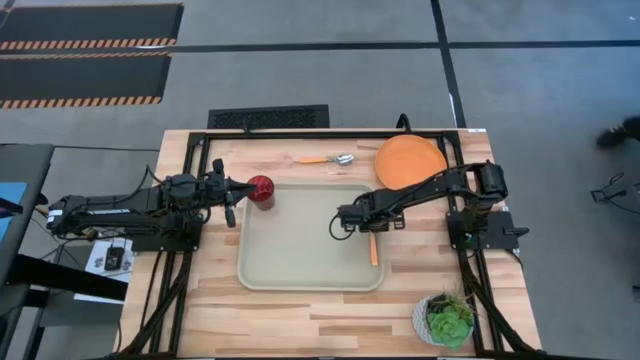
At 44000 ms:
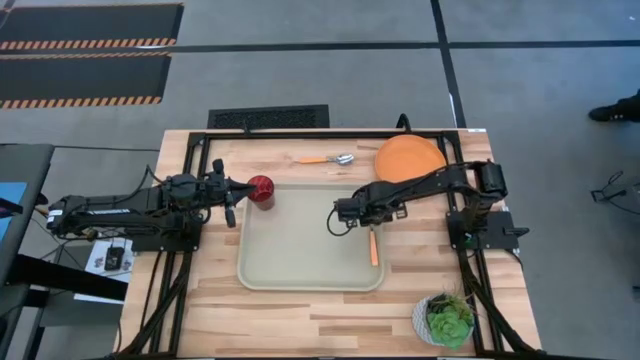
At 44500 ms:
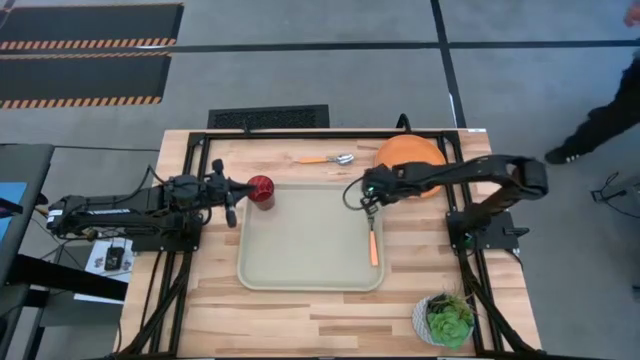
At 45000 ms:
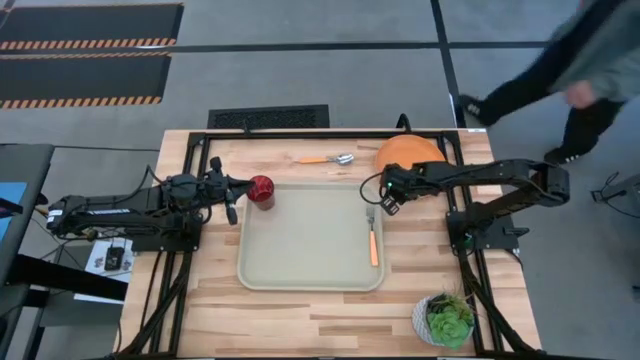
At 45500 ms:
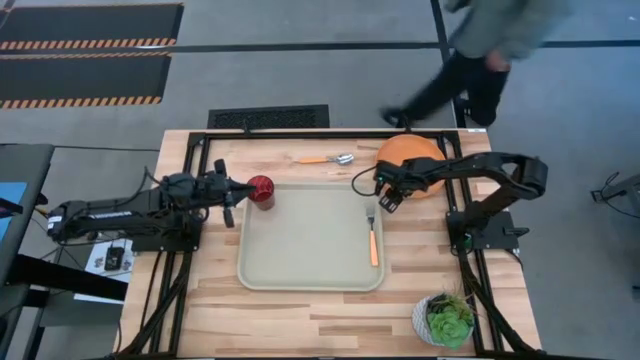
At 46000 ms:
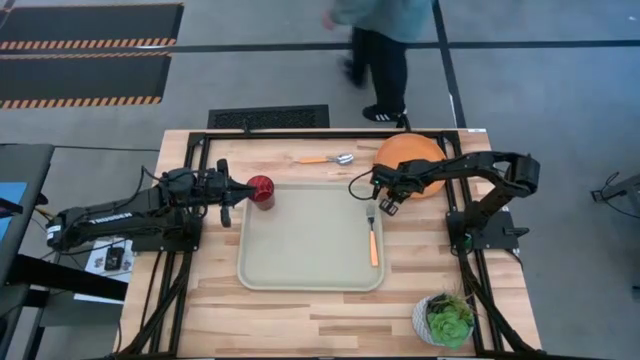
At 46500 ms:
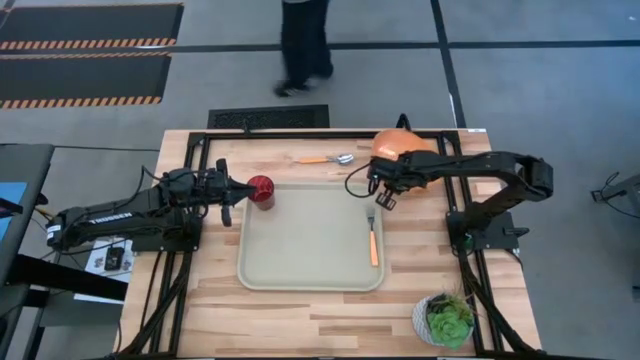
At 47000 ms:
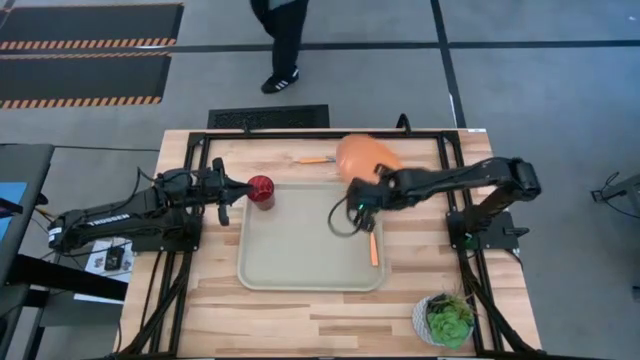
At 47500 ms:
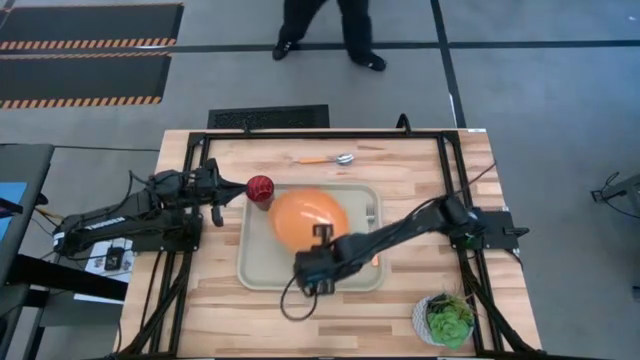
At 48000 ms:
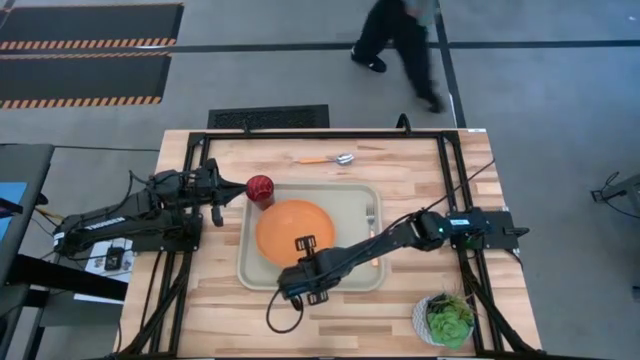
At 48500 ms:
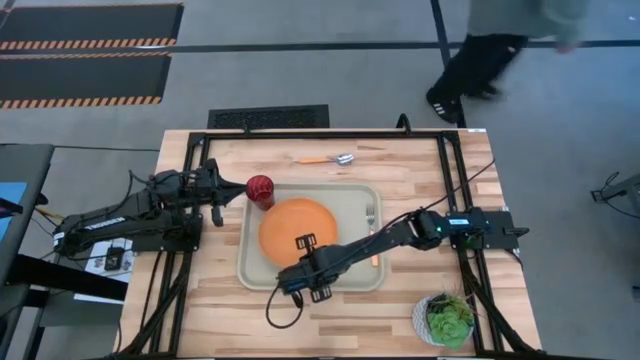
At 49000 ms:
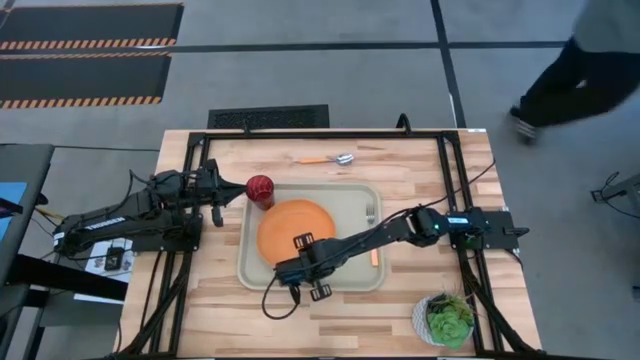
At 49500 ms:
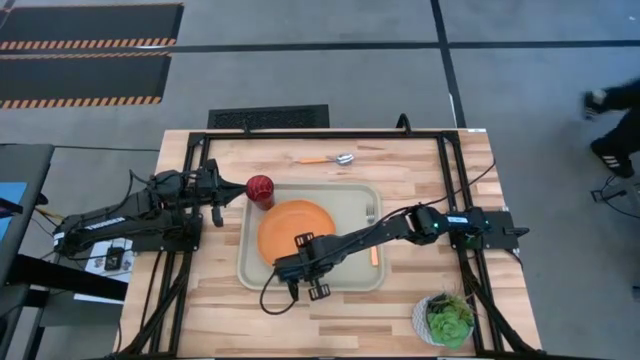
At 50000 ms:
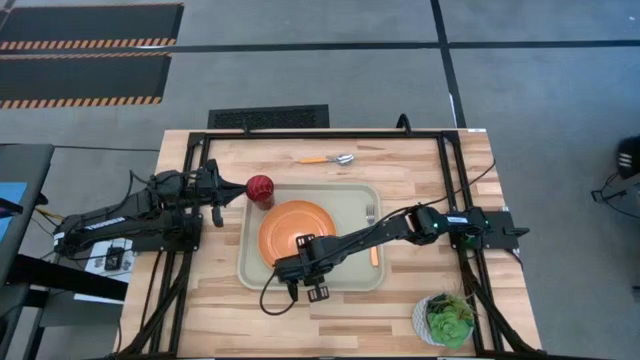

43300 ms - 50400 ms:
Task: Pick and place plate/cup/fork/spoon on tray
Put the orange plate in the middle of the gray serving tray

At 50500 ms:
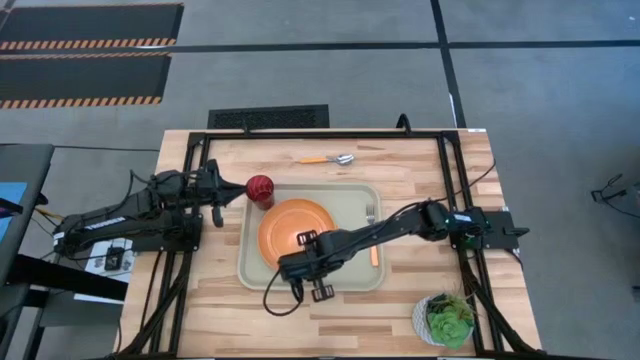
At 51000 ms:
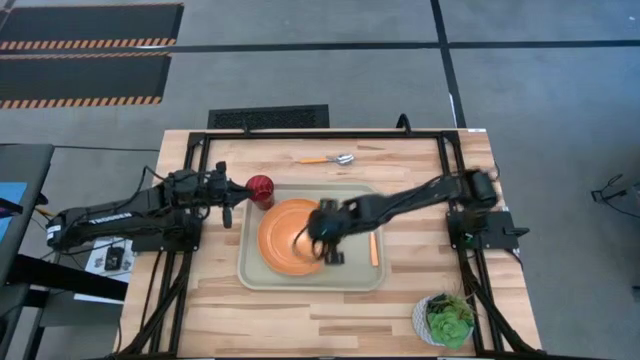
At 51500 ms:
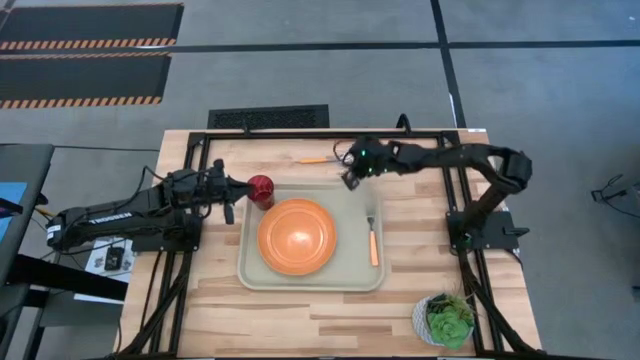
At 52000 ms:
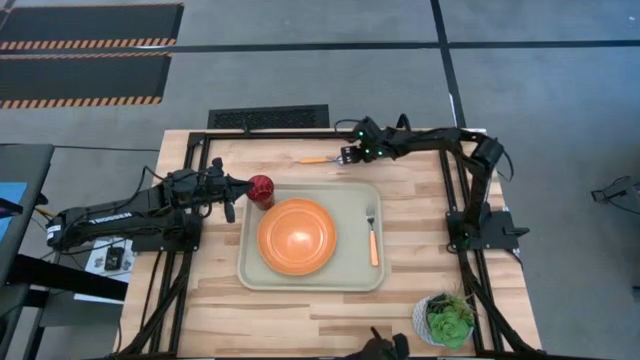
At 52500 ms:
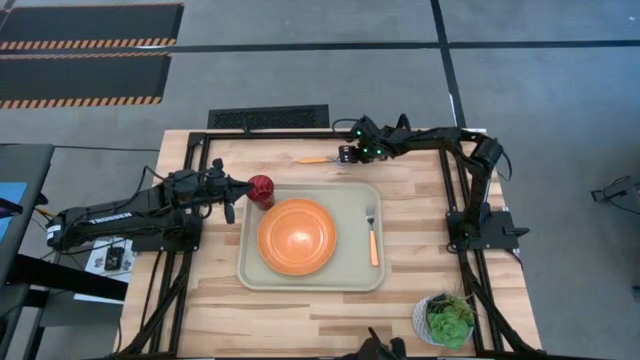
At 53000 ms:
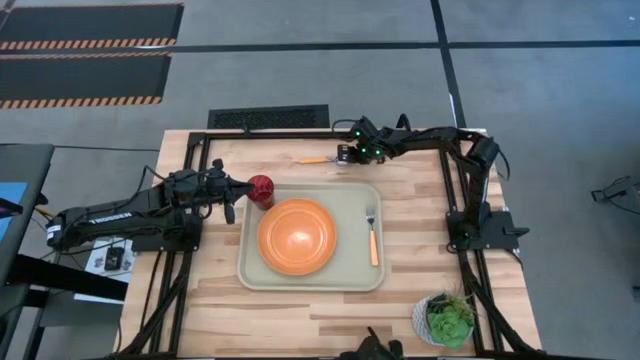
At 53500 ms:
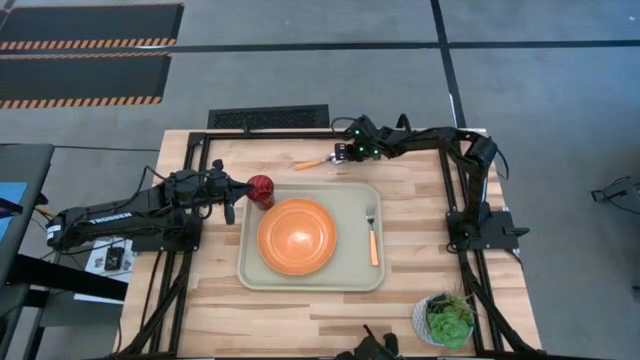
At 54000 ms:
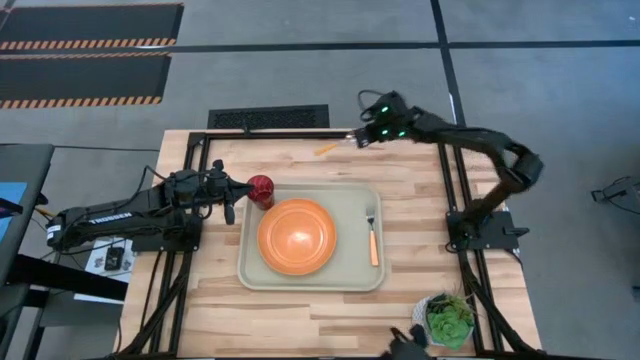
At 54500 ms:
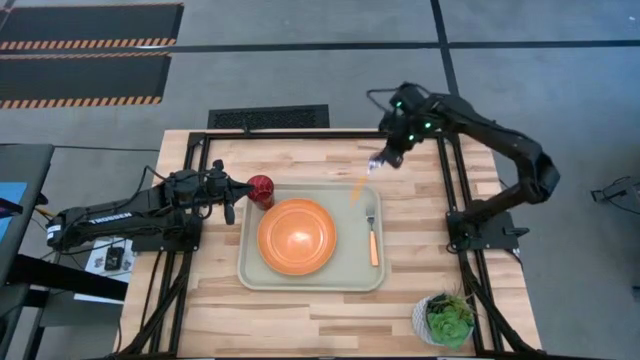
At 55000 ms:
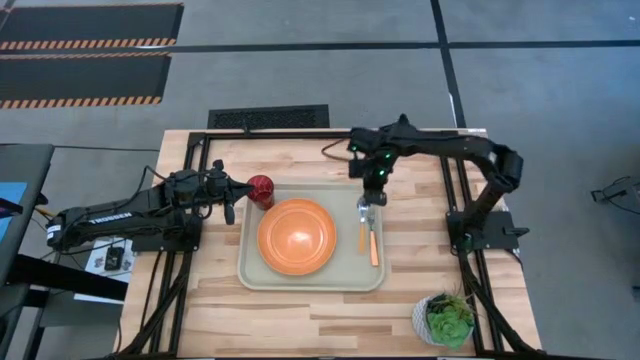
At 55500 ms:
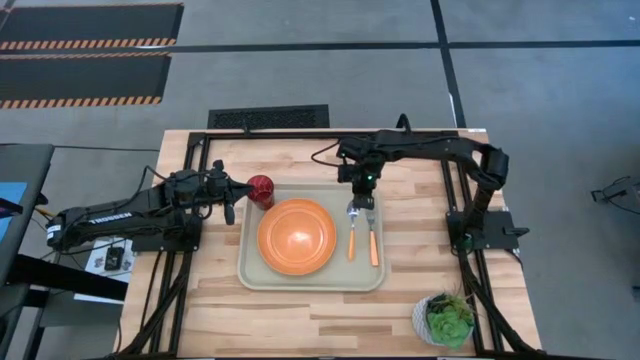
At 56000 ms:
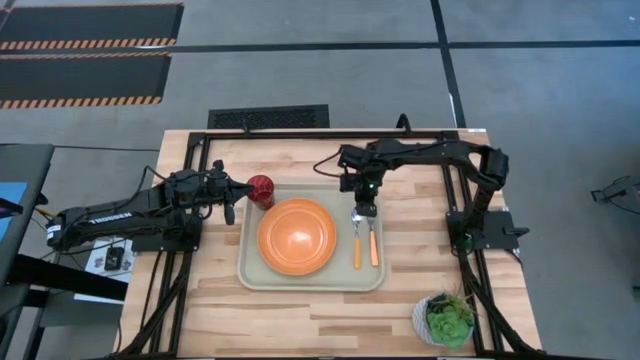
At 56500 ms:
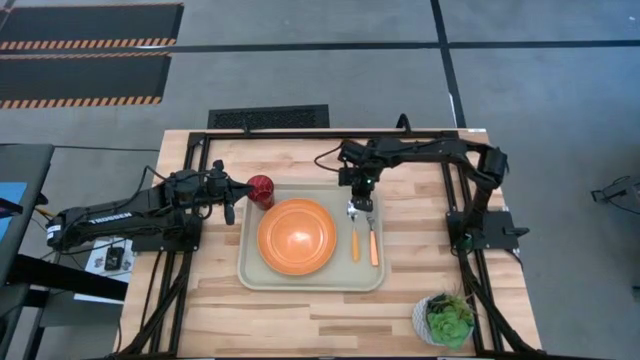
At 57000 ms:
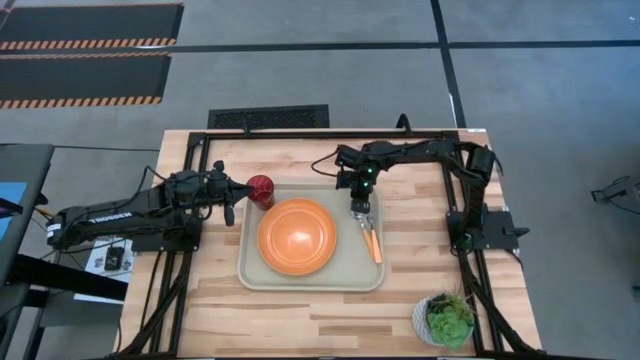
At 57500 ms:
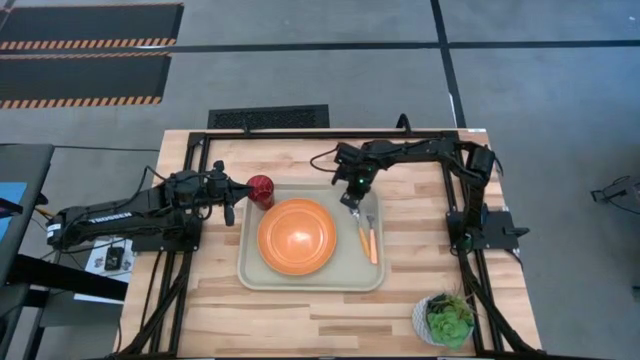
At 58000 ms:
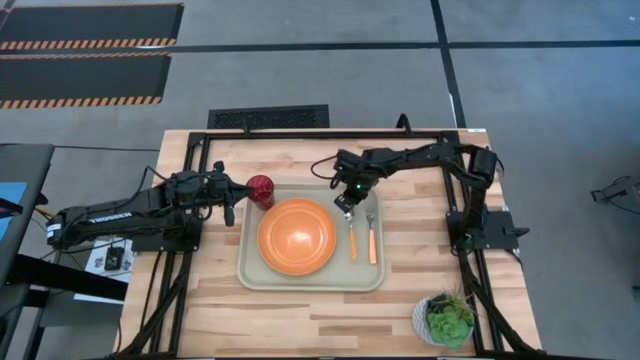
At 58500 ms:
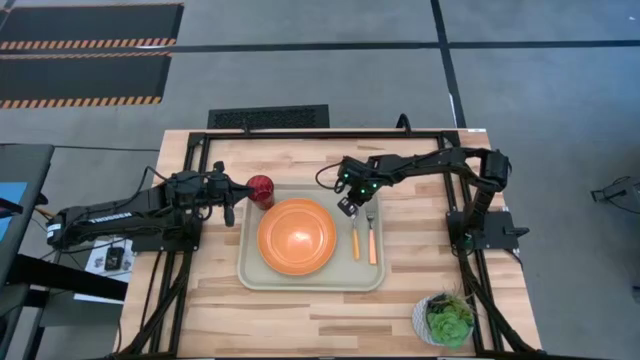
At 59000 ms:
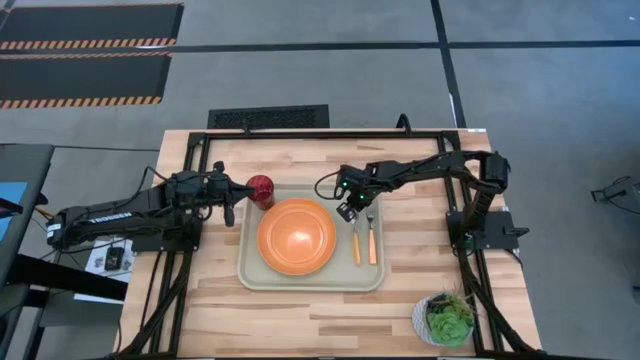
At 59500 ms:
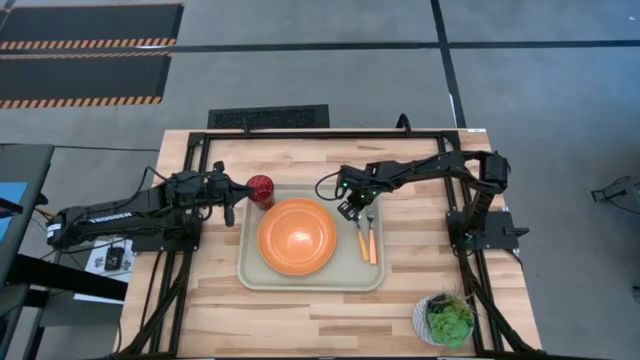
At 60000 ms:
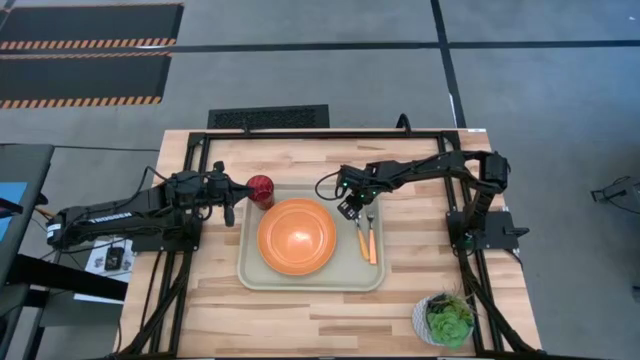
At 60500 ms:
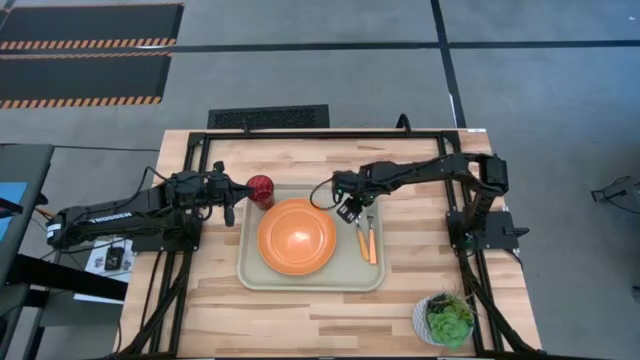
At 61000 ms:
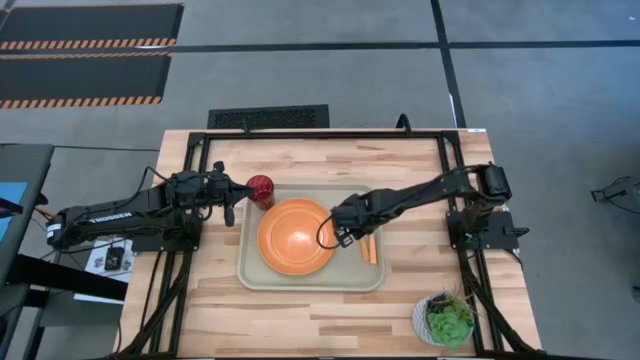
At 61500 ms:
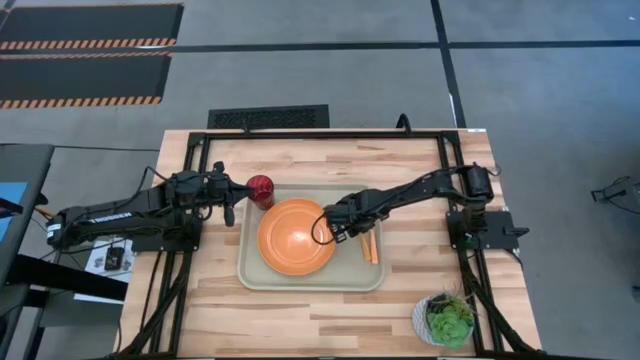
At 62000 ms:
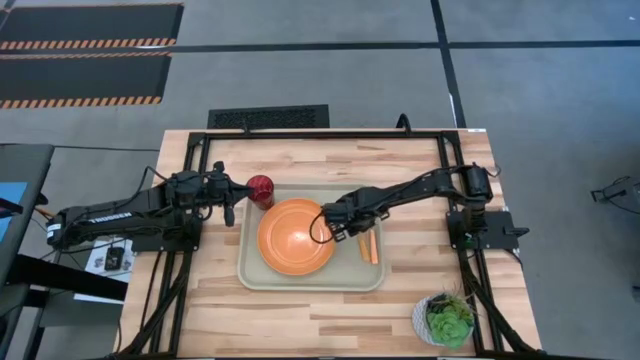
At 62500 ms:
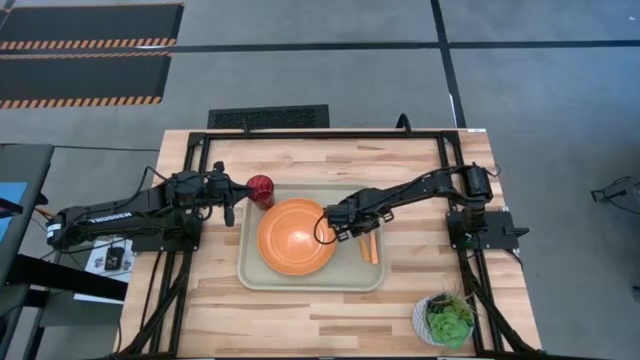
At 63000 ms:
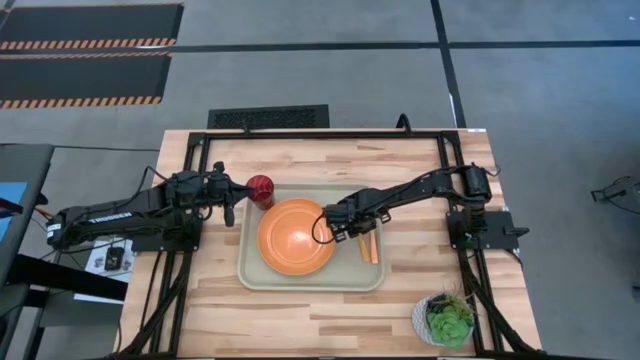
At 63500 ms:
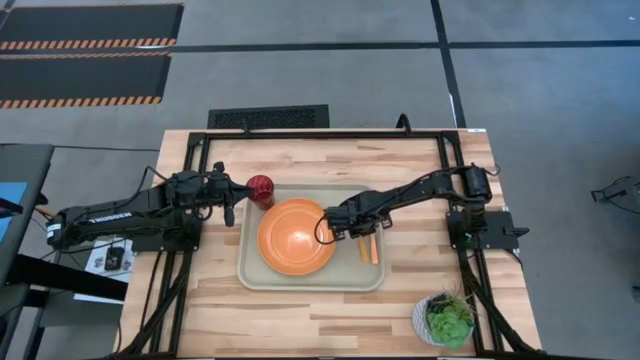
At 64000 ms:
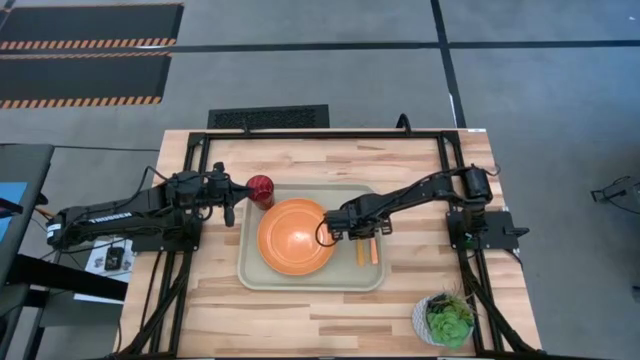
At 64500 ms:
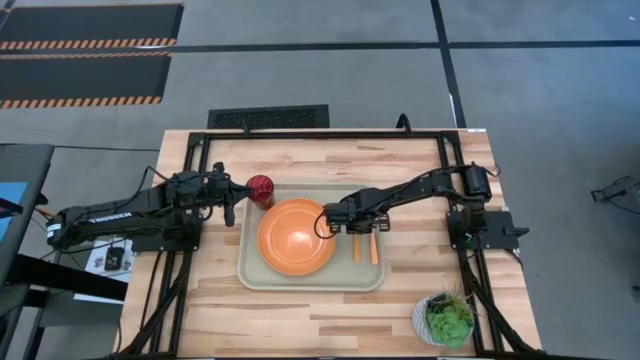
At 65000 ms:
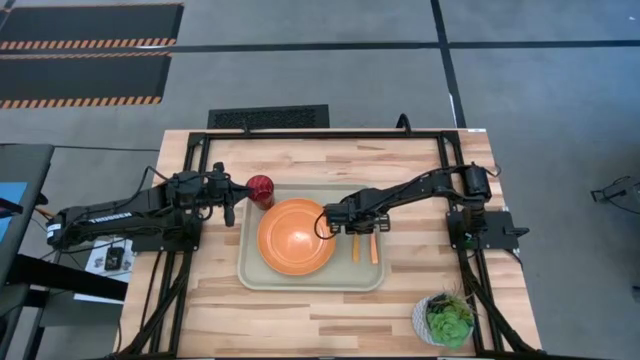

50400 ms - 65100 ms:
Put the orange spoon between the orange plate and the orange fork on the gray serving tray
